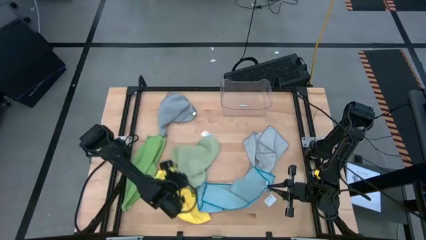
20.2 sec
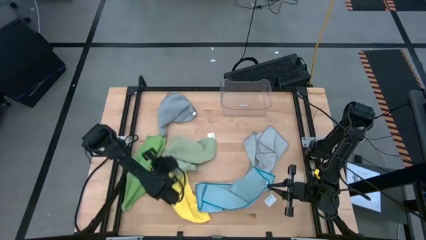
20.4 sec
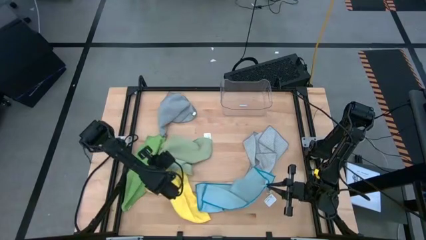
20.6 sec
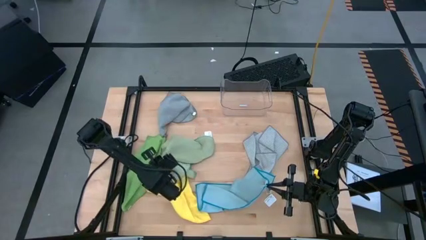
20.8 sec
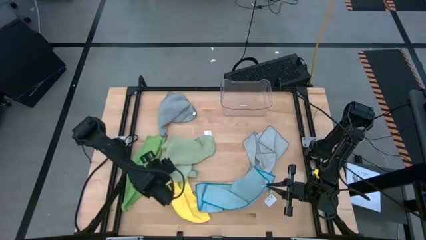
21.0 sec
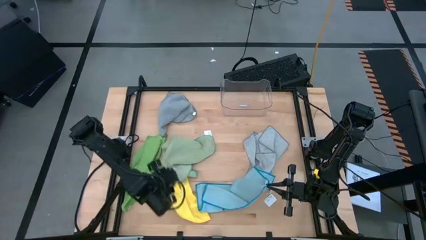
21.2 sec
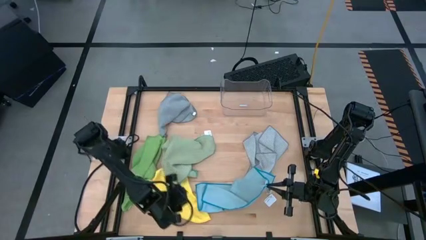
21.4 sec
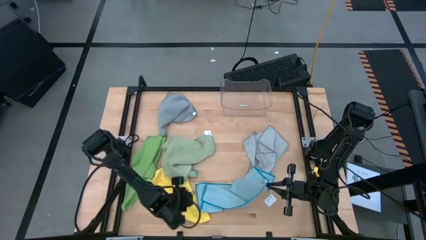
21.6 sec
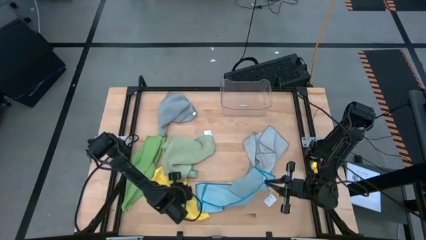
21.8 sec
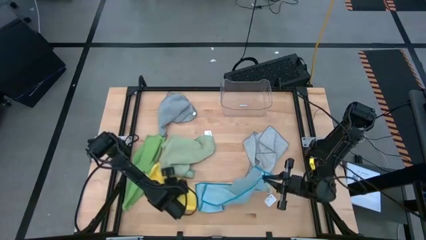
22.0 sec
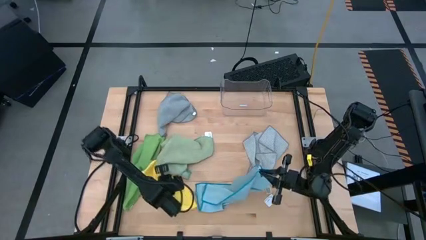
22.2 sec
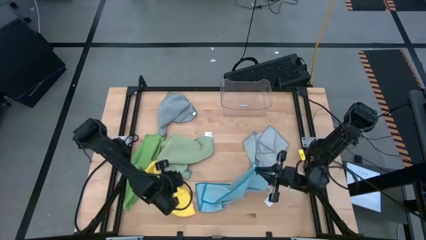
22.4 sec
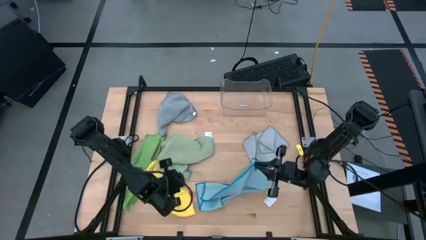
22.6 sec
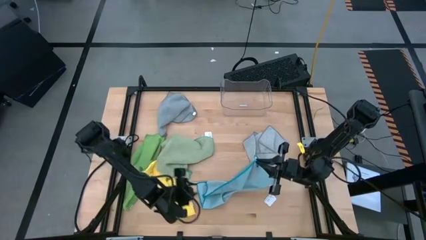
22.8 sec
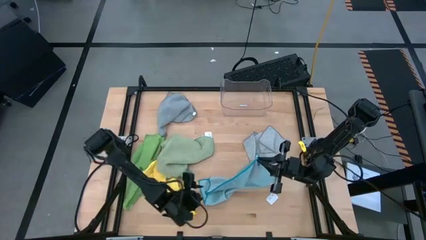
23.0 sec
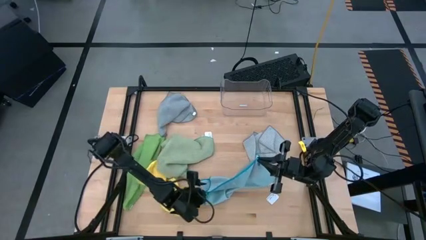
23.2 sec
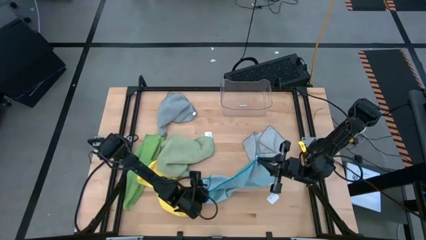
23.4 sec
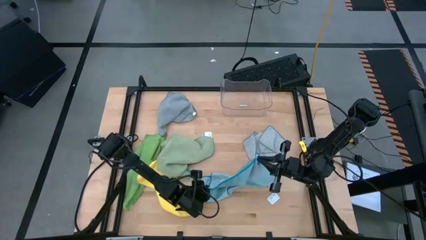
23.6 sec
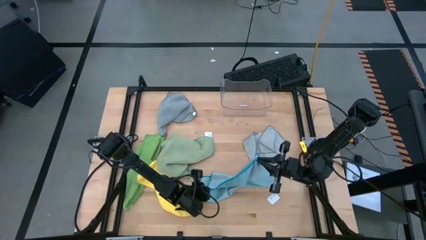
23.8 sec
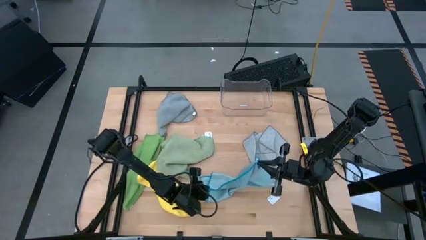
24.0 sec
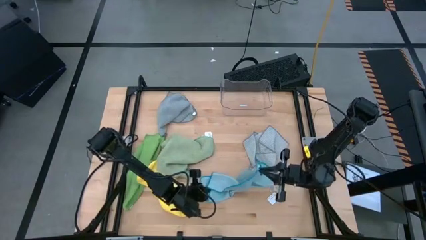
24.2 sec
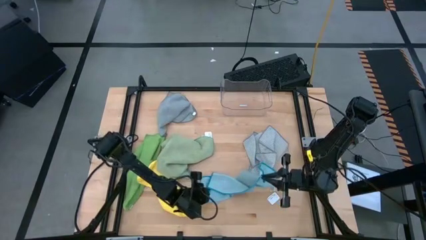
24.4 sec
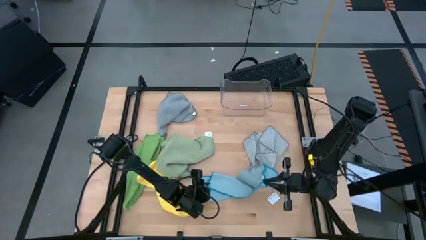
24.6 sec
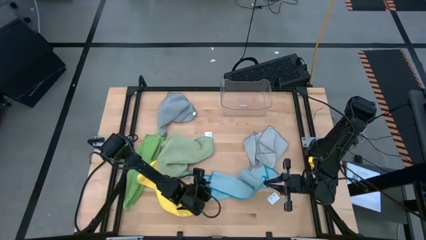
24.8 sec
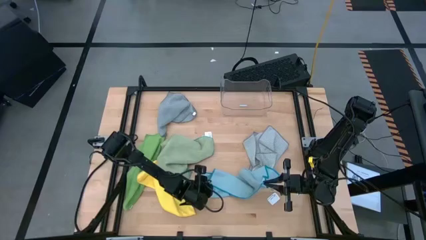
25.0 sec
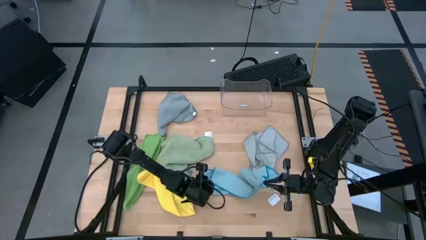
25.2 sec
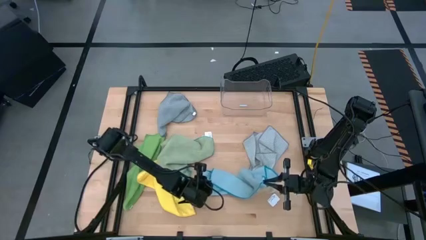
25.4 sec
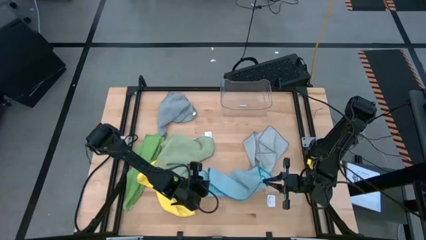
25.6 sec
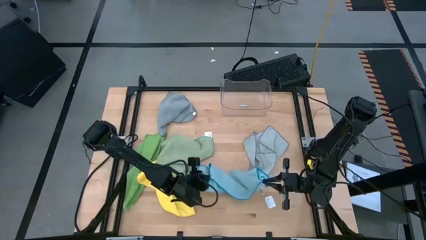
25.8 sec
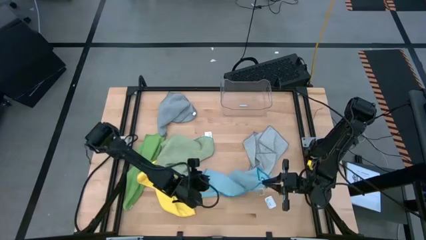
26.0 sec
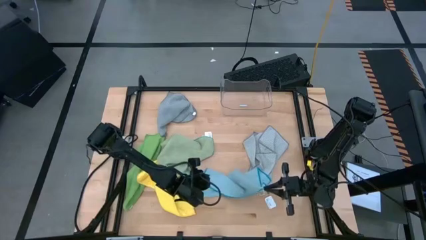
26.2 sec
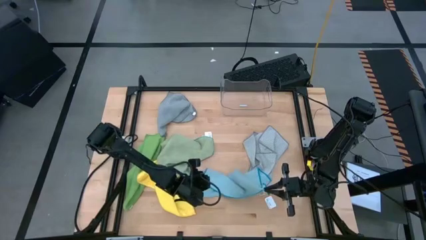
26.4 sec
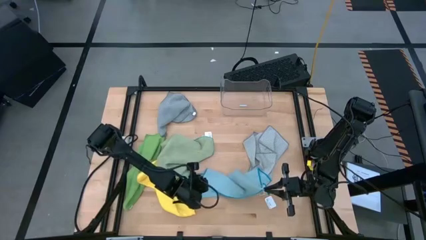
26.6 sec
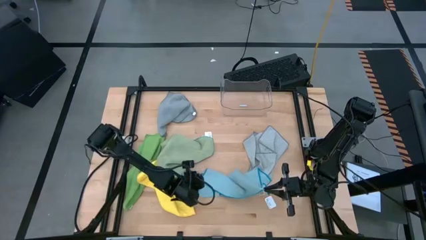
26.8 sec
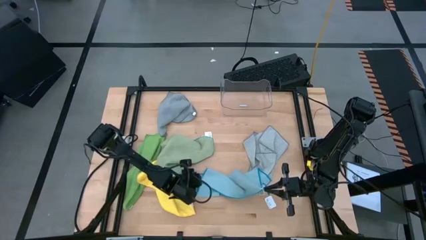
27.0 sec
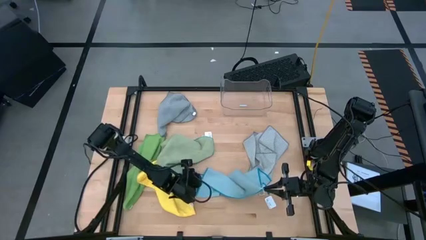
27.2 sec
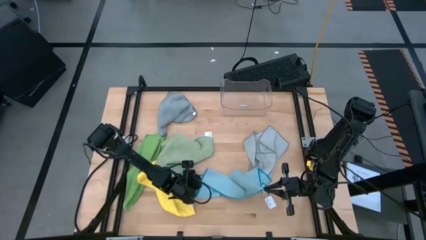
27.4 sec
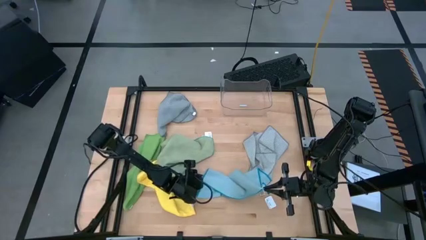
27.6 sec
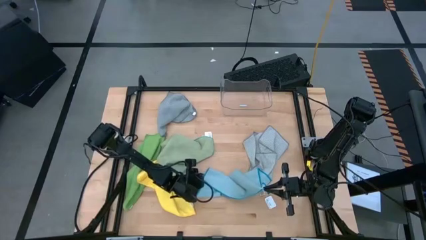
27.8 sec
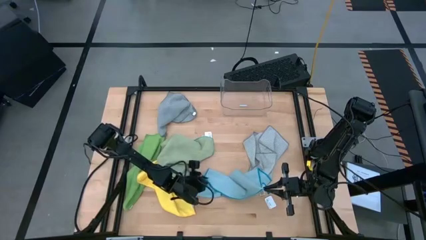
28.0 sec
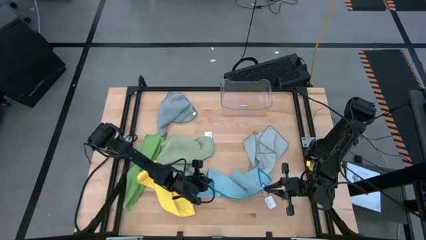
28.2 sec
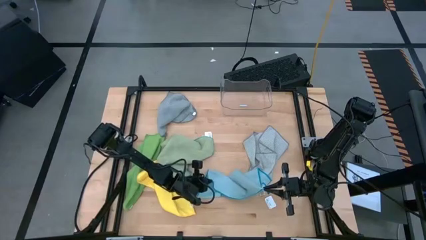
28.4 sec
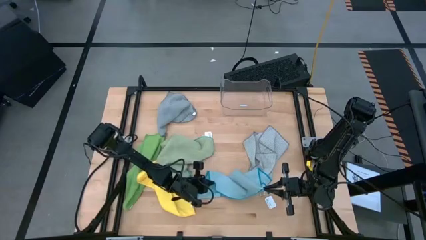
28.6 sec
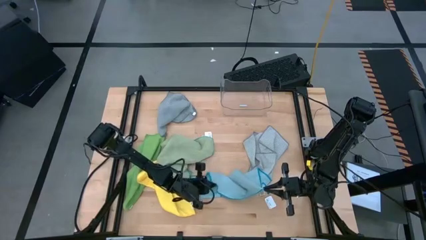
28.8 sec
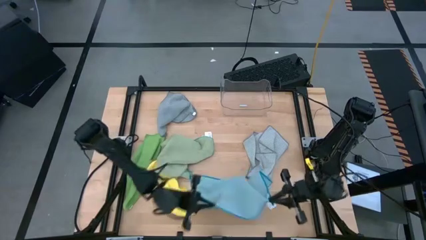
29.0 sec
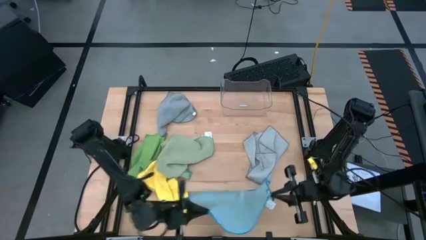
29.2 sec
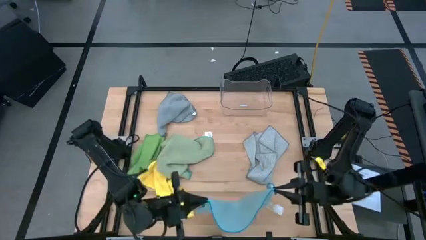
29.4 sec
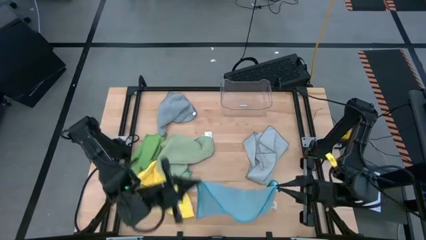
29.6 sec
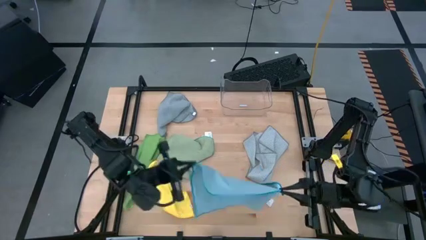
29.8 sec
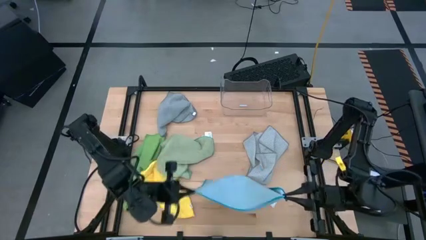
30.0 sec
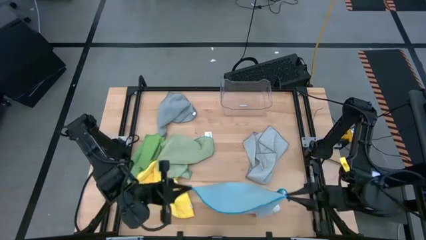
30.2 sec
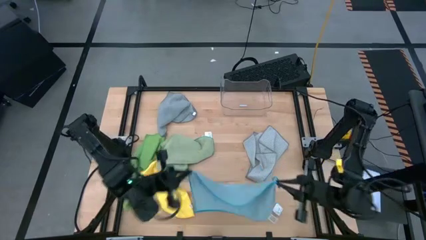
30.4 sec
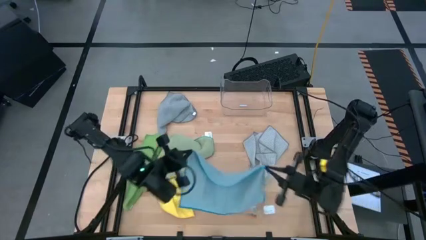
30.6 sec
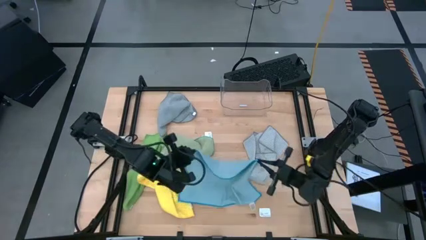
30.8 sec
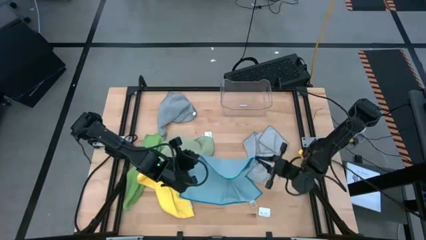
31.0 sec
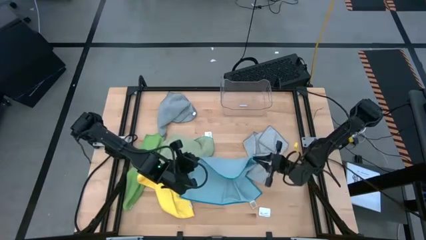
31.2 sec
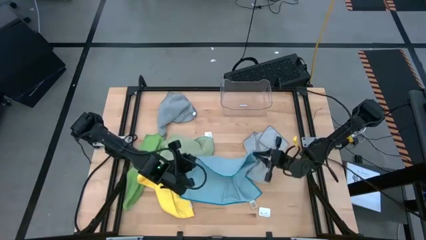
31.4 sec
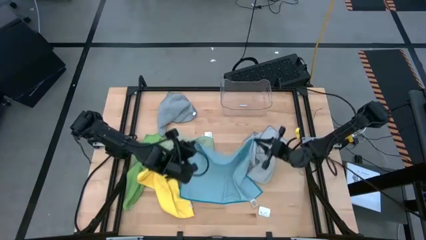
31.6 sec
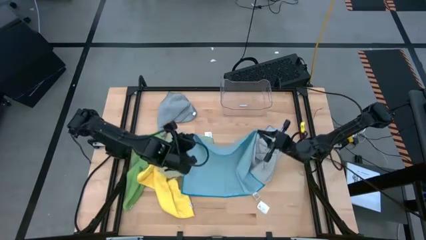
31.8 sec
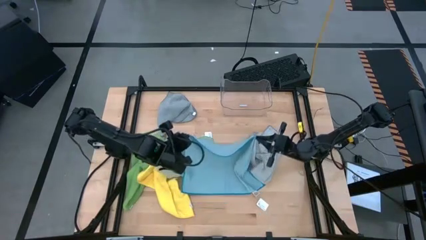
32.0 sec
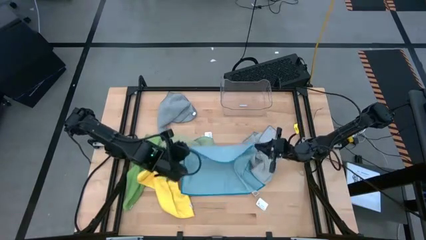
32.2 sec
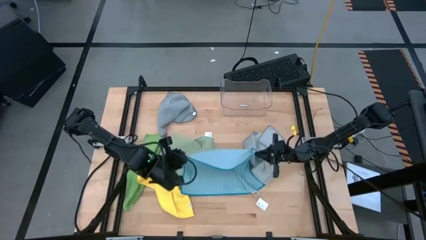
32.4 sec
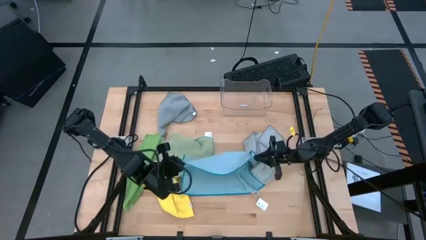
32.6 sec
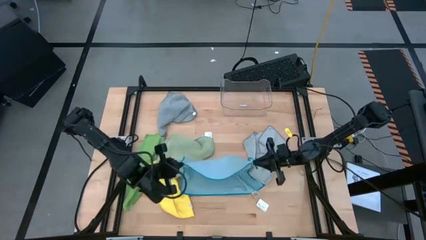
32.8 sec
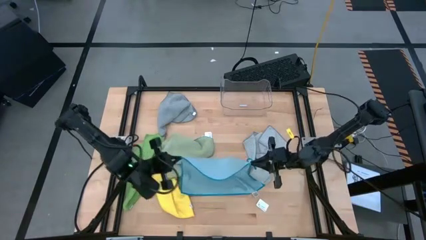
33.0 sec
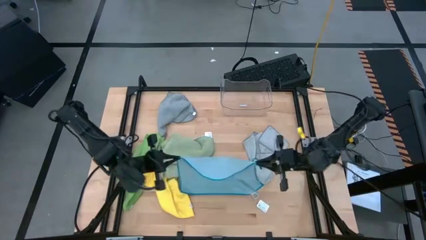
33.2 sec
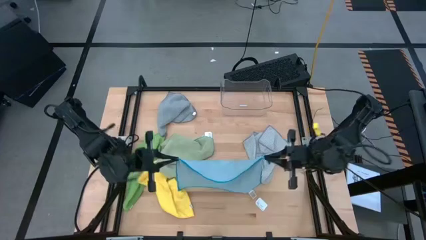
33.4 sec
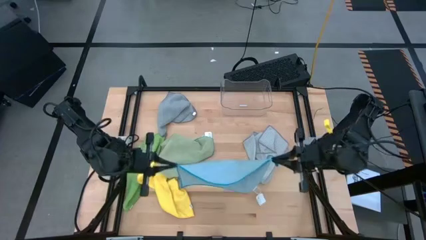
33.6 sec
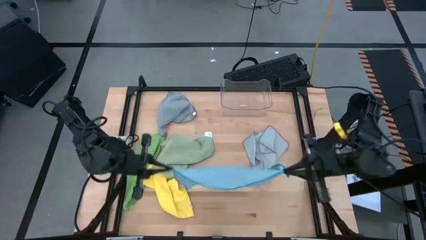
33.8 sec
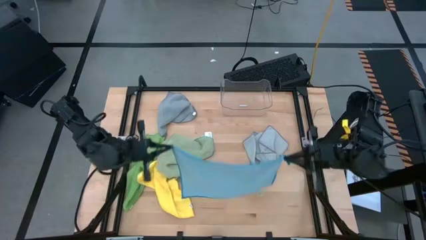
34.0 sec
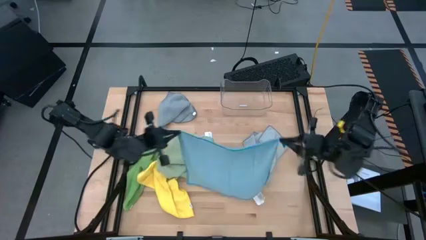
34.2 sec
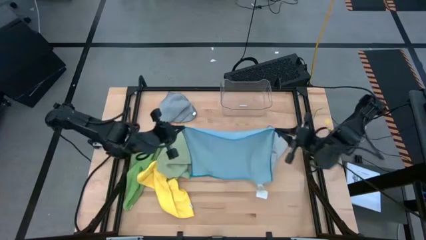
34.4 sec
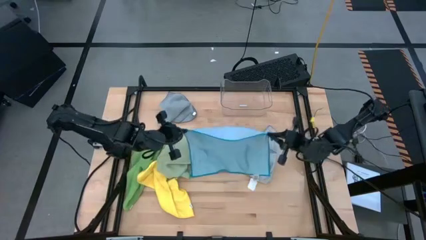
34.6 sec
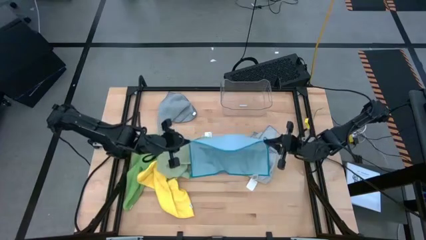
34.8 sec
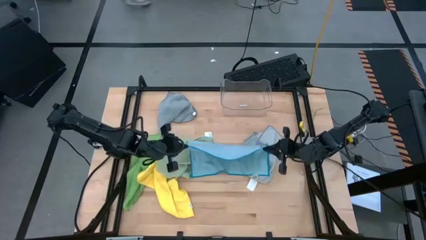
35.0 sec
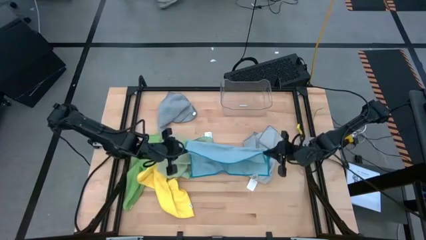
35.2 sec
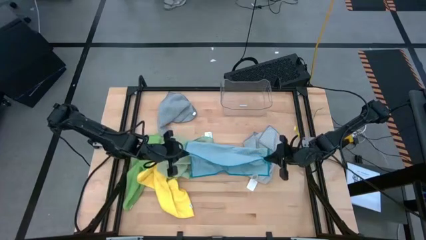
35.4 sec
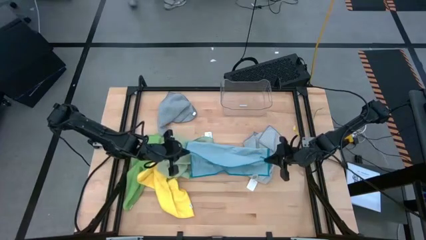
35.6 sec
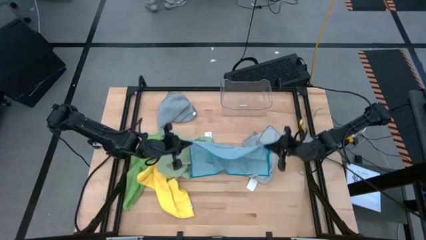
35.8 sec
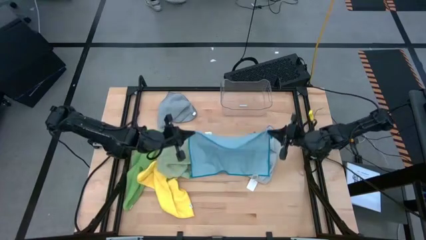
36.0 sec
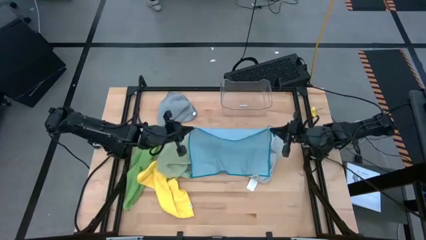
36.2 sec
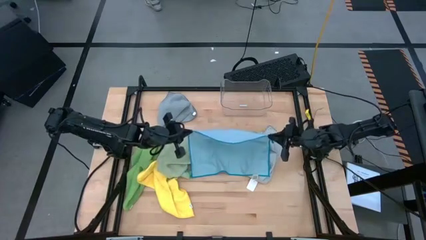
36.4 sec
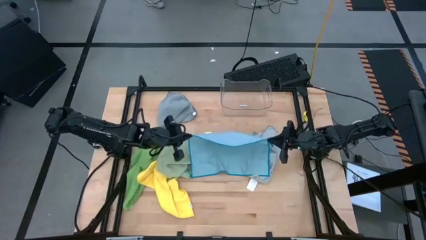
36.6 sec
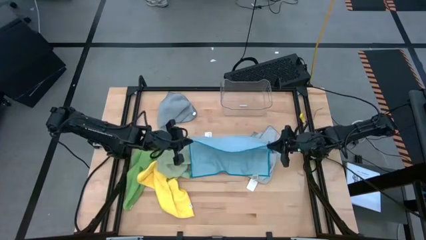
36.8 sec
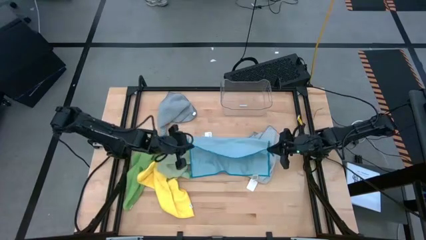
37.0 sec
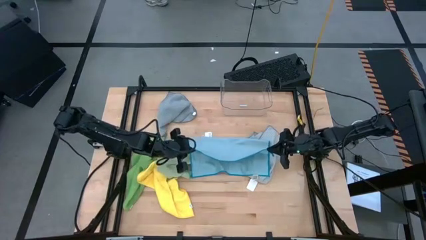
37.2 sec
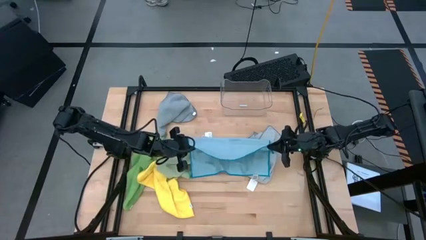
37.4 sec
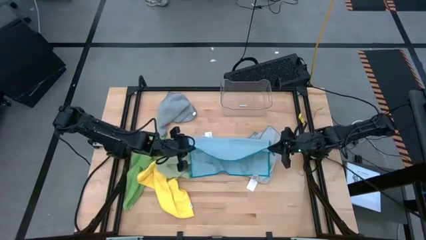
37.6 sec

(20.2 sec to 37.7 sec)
Task: Fold microfiber towels
Fold the blue towel
